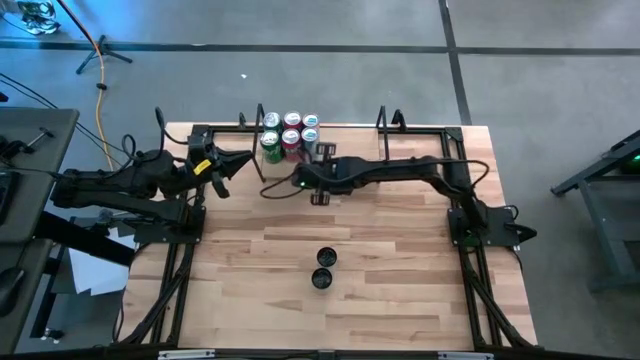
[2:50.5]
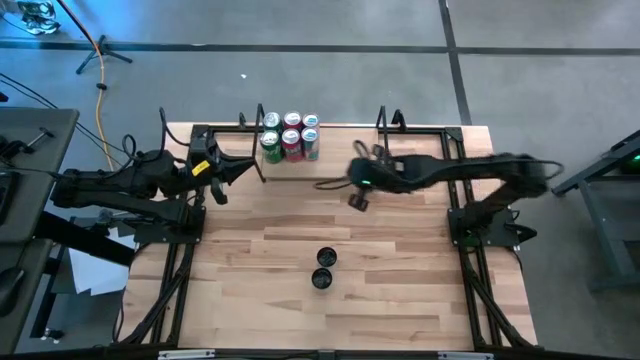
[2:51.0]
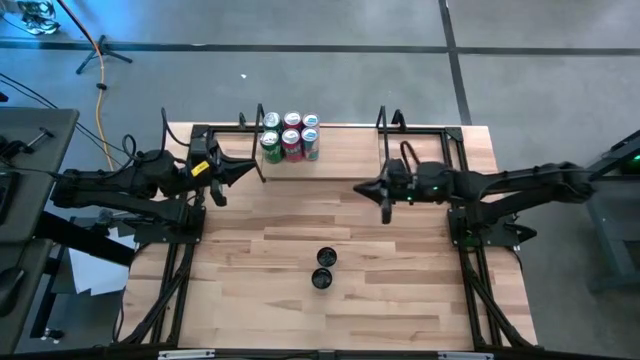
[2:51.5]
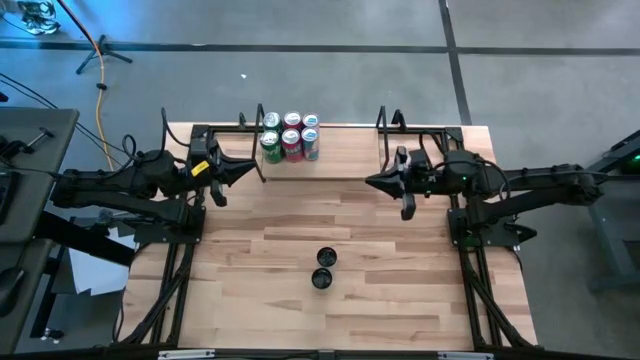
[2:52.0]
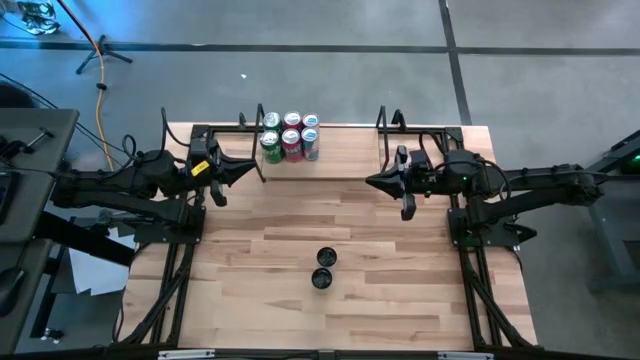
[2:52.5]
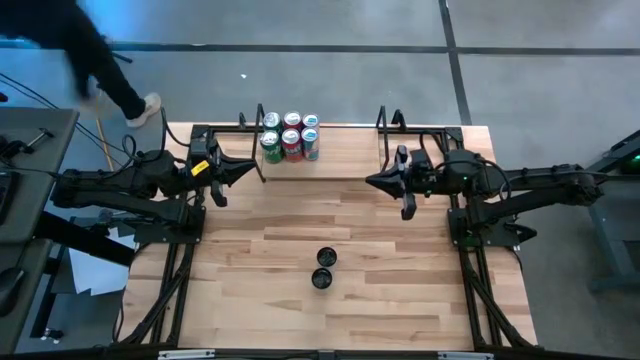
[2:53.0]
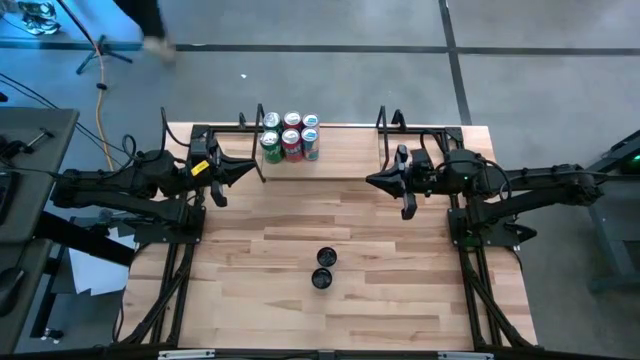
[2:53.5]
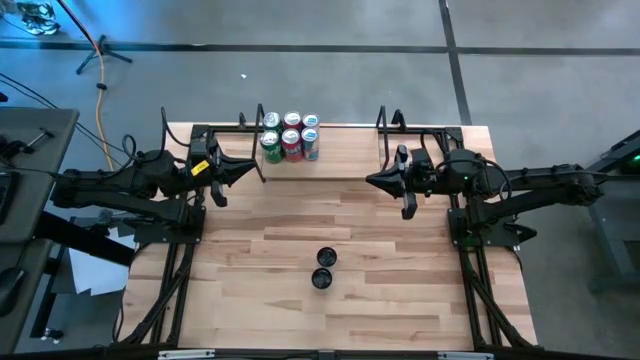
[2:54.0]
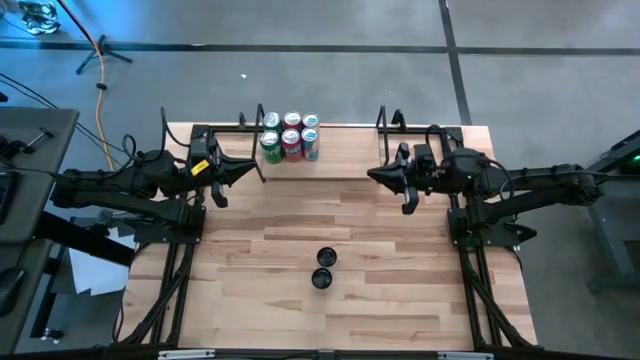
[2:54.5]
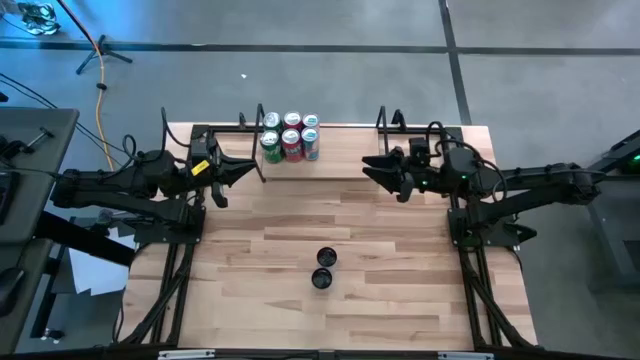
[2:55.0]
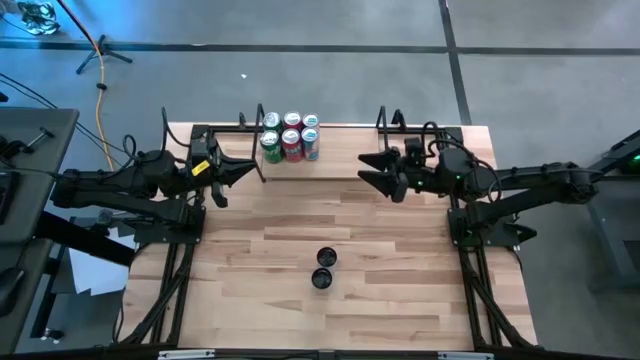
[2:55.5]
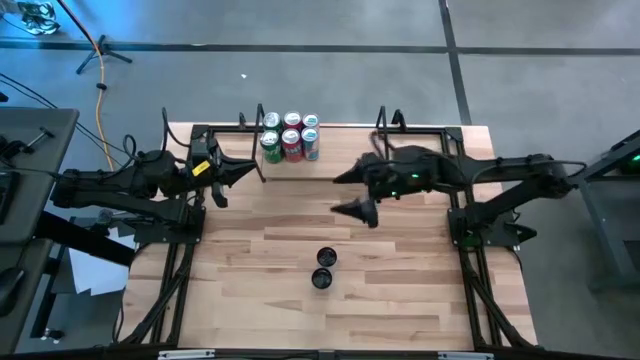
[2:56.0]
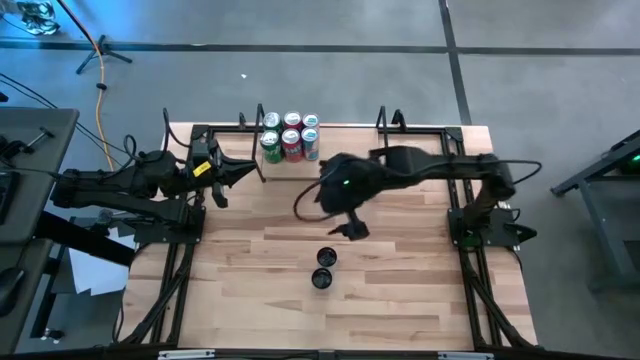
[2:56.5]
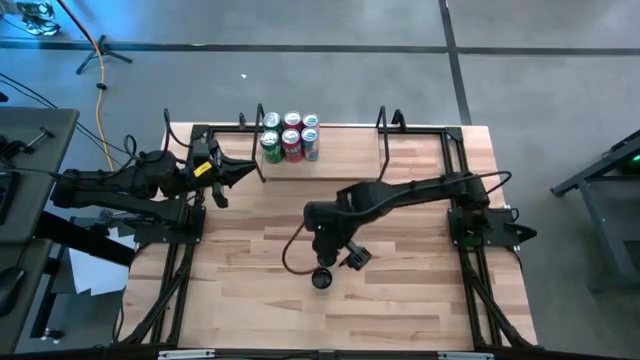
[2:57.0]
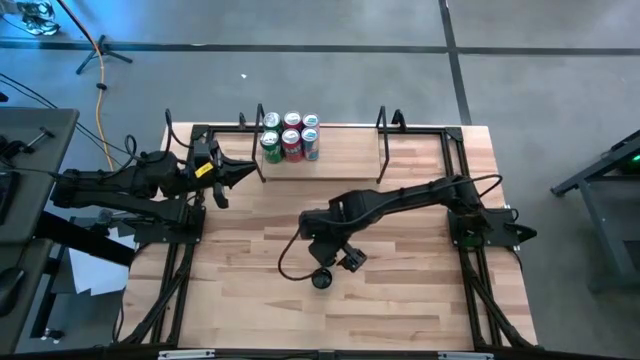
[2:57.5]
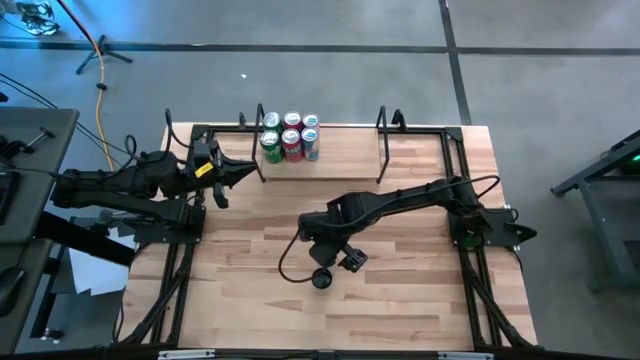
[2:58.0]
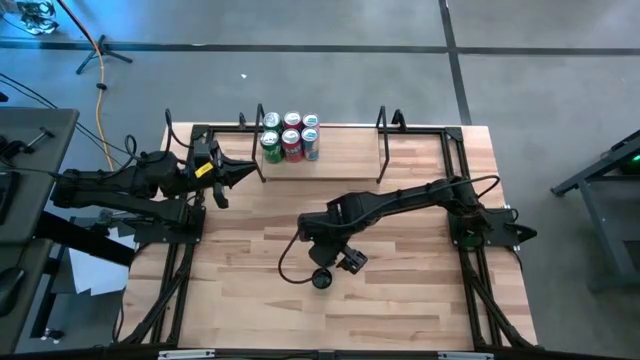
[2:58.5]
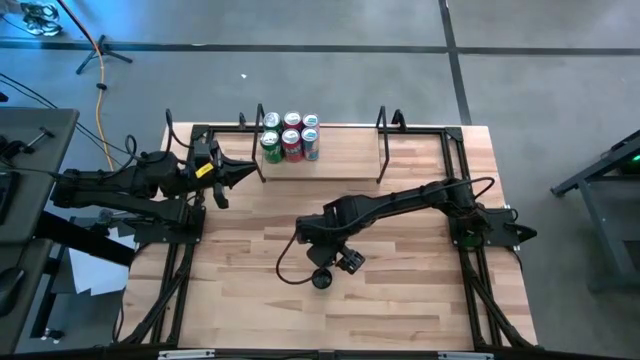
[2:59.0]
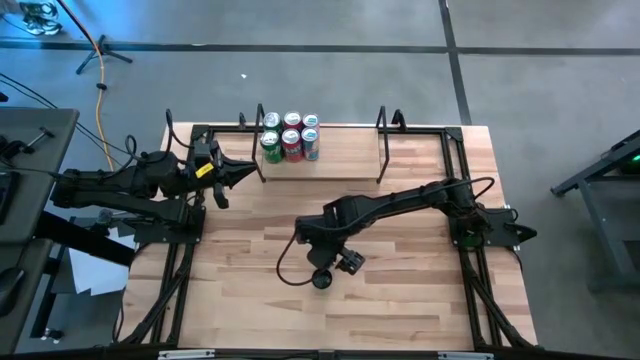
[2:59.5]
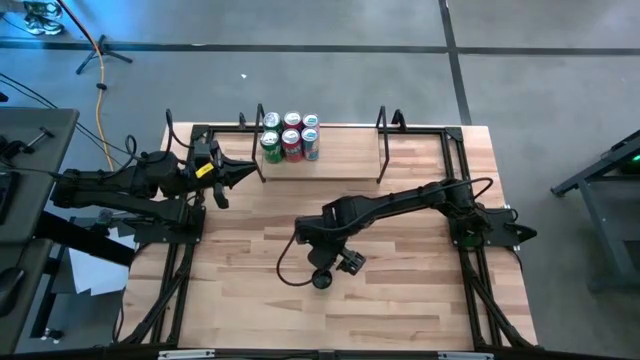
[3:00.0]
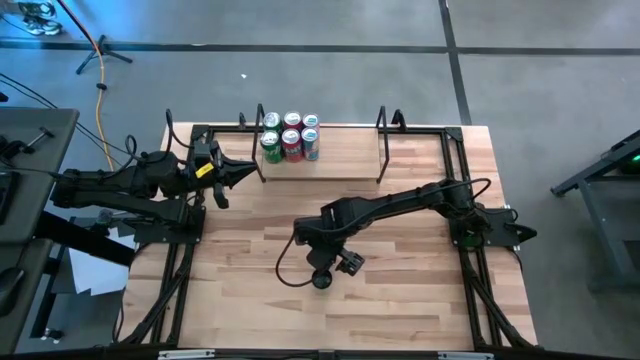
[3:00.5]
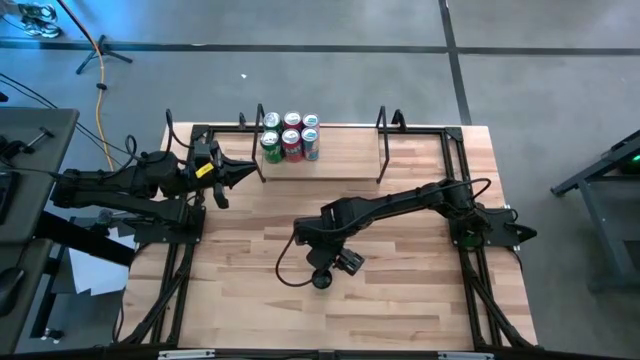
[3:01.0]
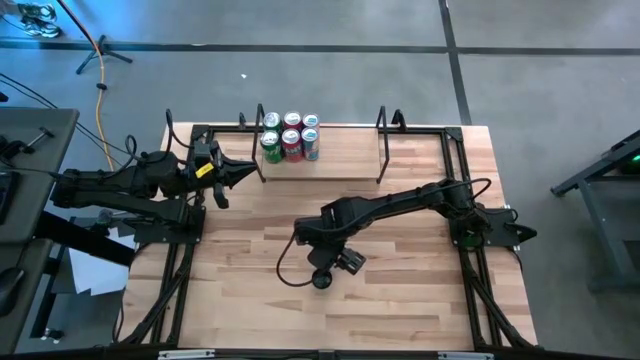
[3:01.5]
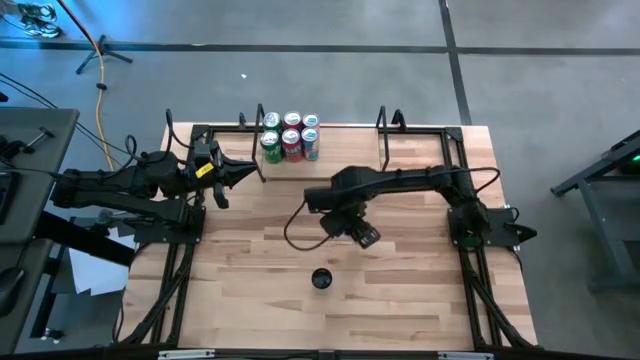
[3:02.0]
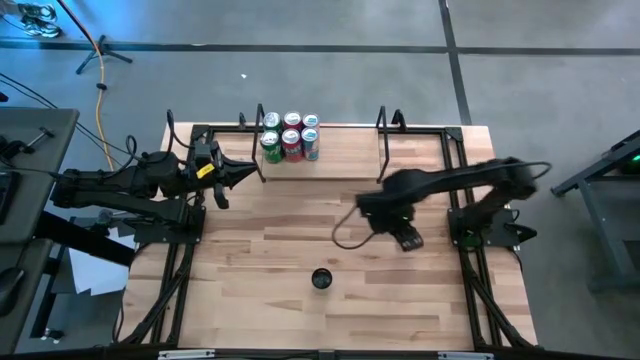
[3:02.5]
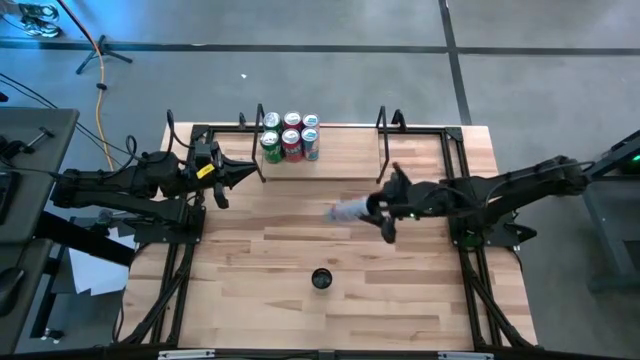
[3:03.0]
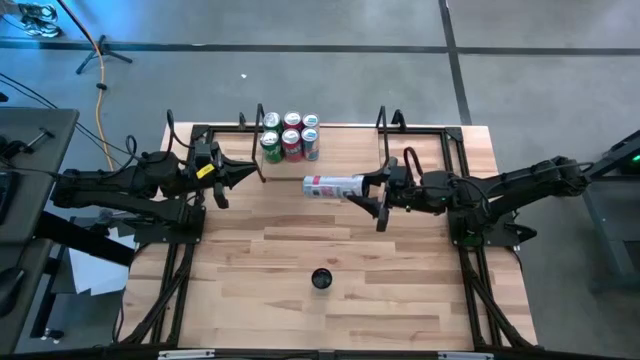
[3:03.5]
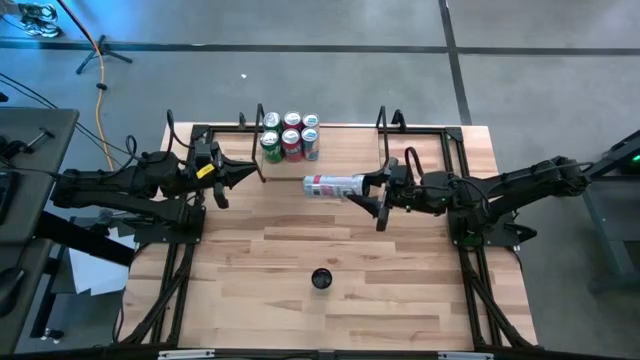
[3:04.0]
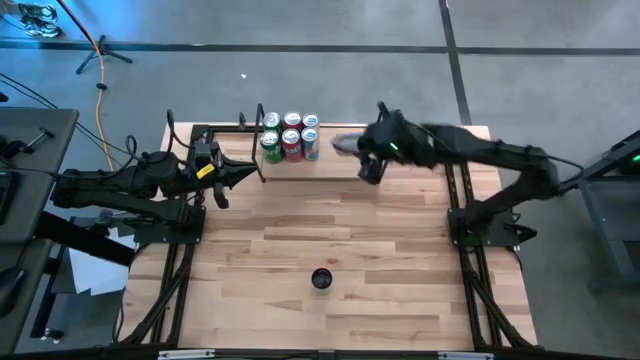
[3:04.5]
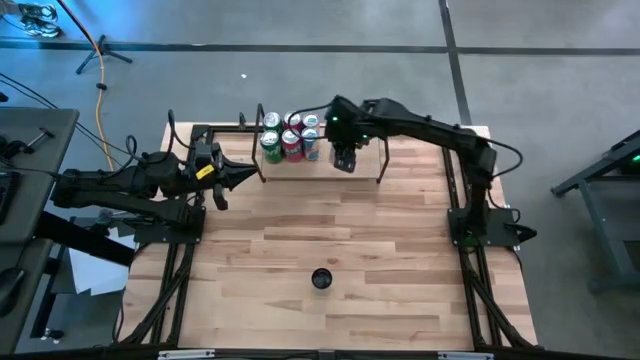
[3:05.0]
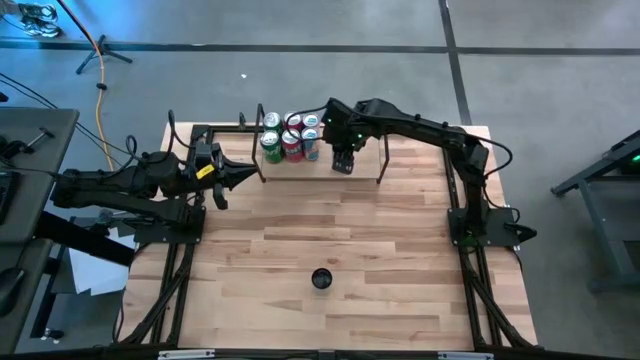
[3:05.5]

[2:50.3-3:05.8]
Task: Place canned beverage on shelf
Put the top white pink soda can on the shelf

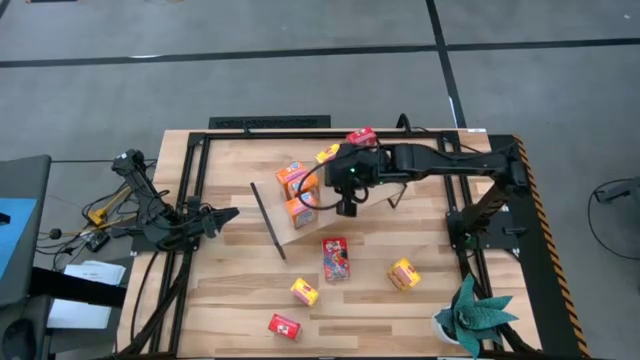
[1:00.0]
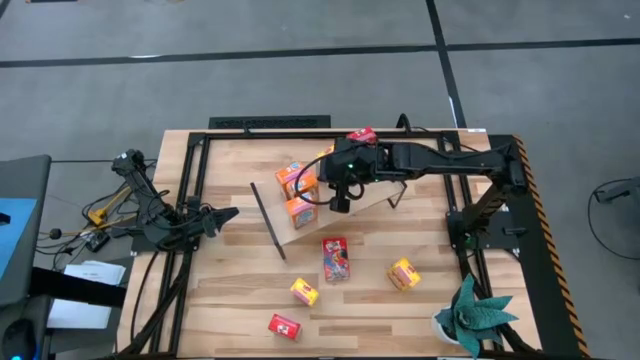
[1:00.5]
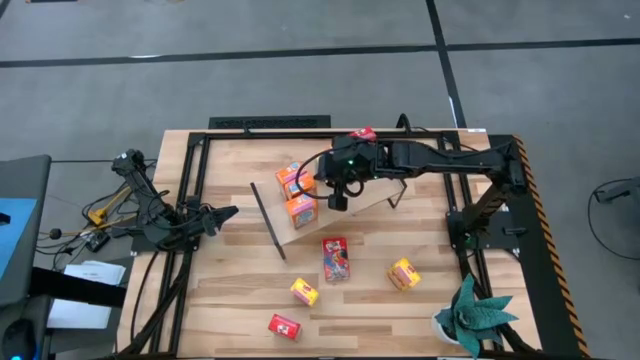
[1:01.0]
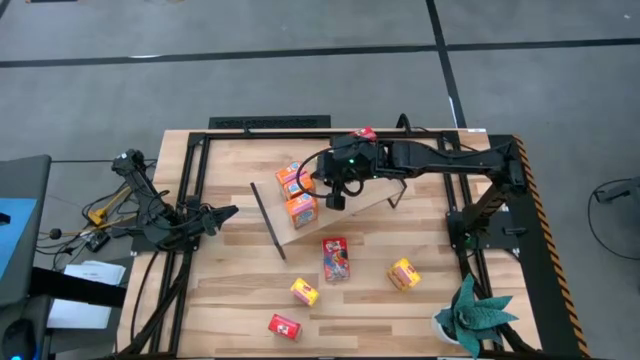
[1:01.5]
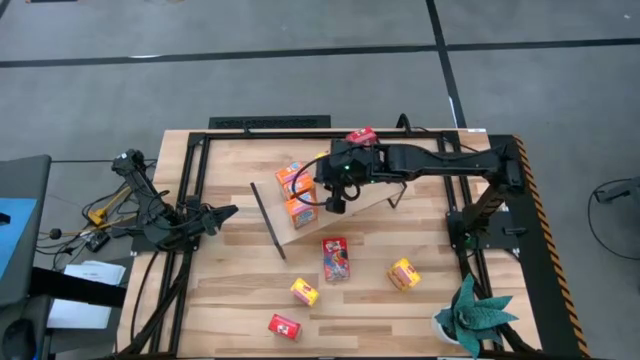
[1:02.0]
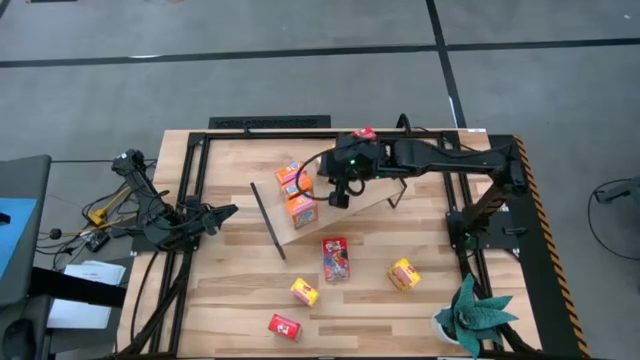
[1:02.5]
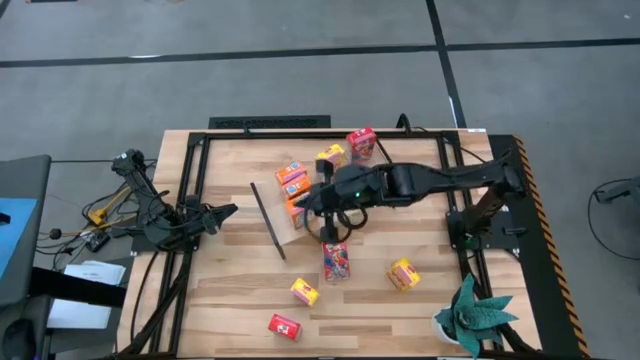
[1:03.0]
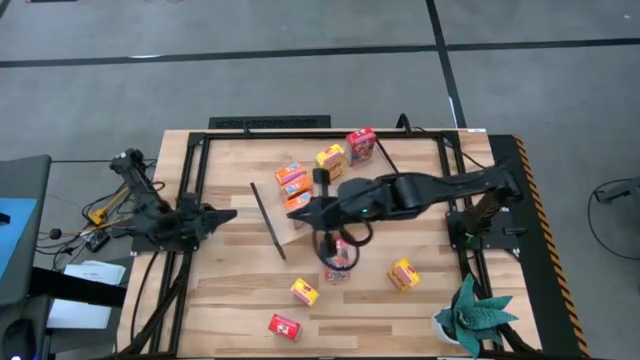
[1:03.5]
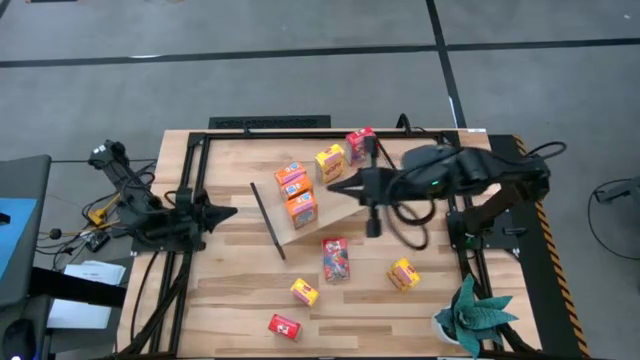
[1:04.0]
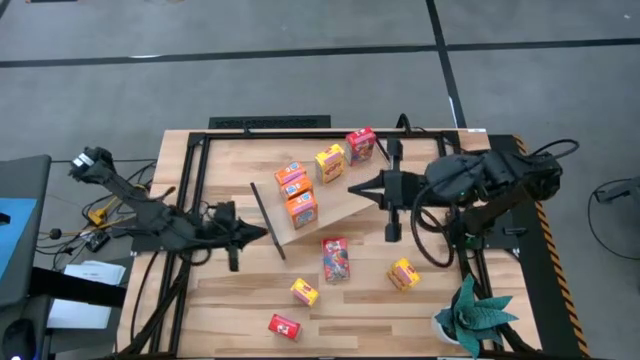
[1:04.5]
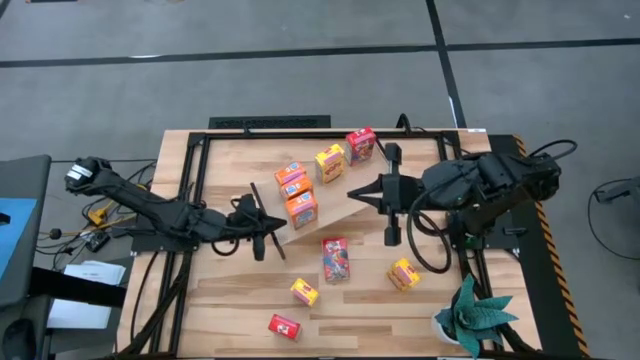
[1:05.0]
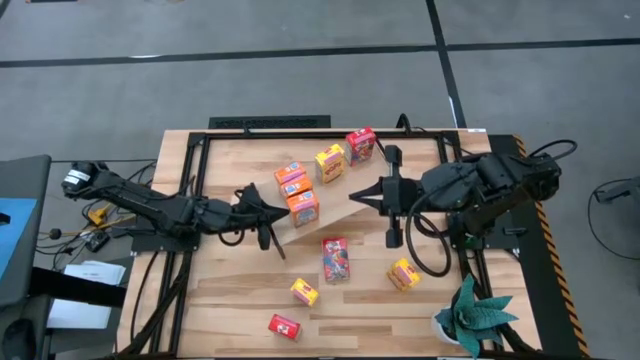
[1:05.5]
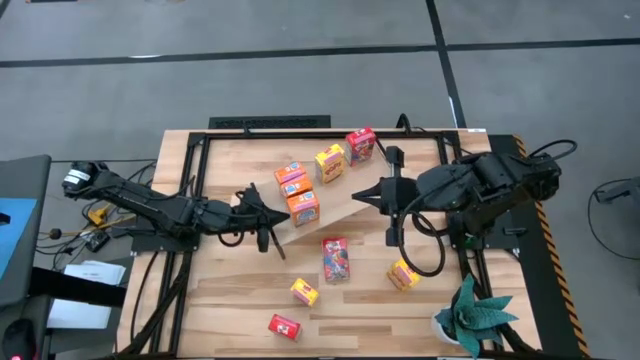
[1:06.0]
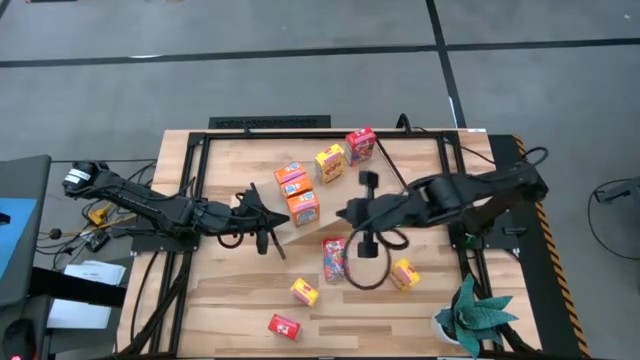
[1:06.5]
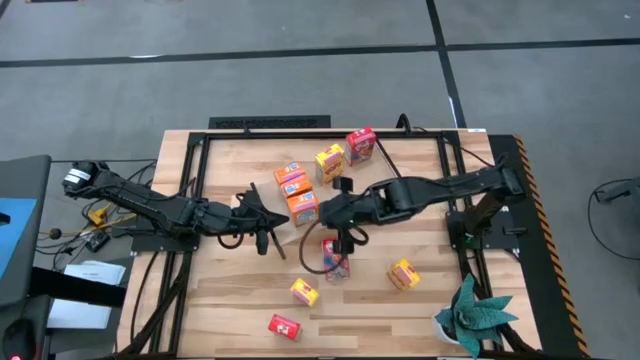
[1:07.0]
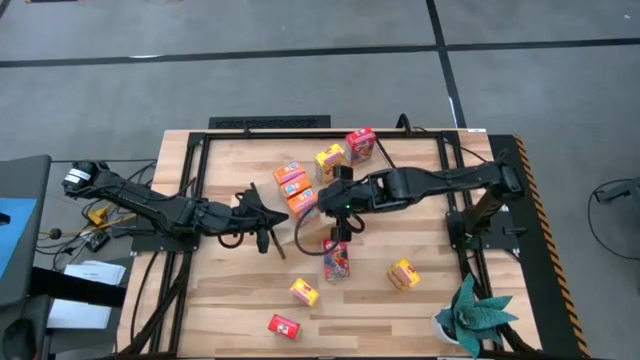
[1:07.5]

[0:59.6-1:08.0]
Task: Stack cereal on shelf
Adjust the orange cereal boxes on the shelf
